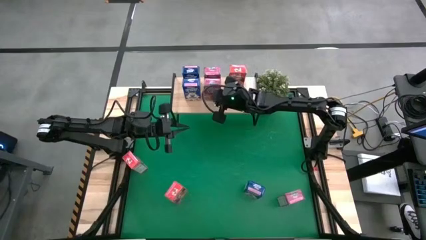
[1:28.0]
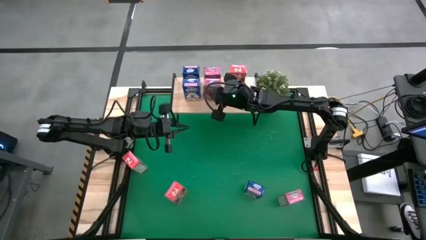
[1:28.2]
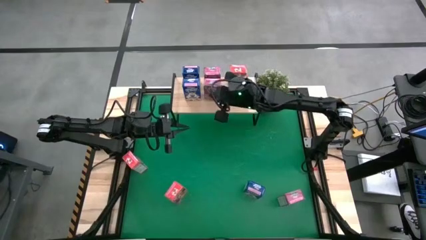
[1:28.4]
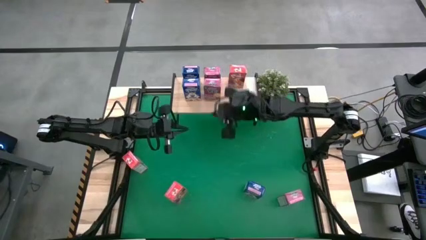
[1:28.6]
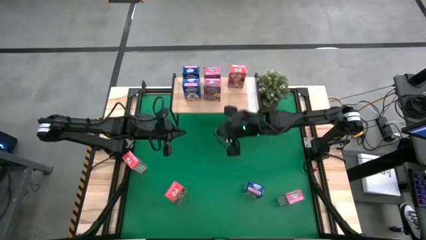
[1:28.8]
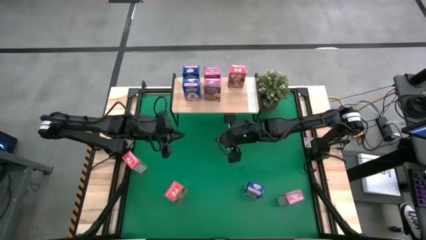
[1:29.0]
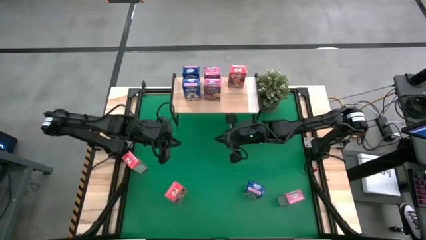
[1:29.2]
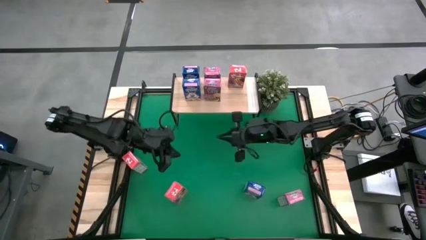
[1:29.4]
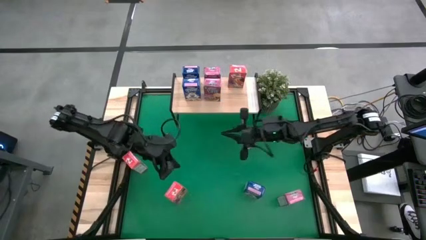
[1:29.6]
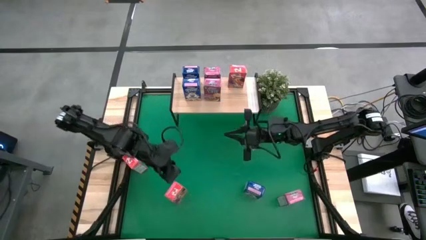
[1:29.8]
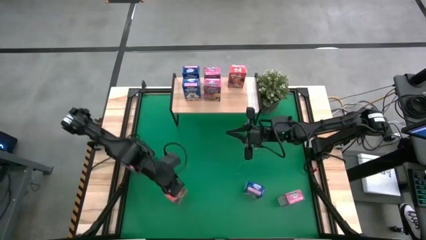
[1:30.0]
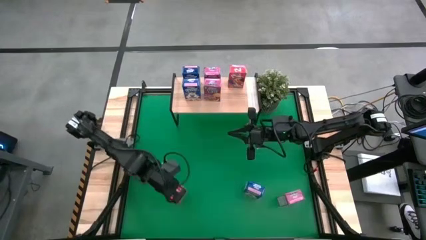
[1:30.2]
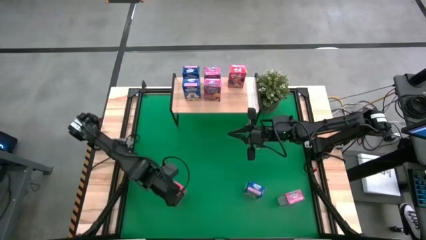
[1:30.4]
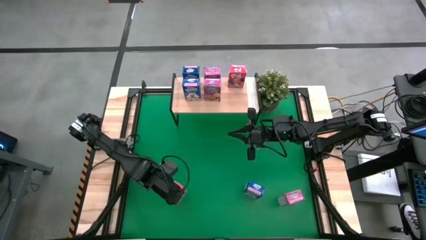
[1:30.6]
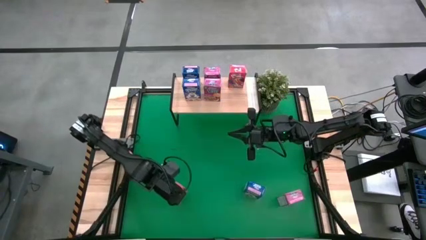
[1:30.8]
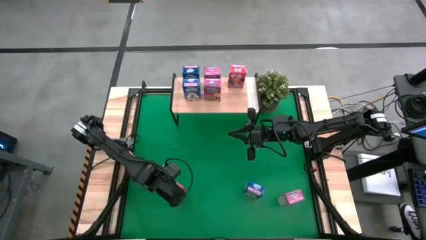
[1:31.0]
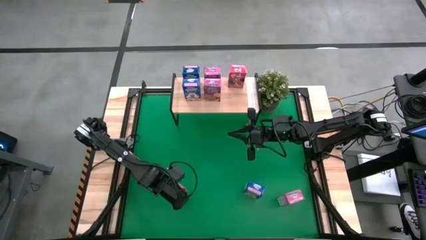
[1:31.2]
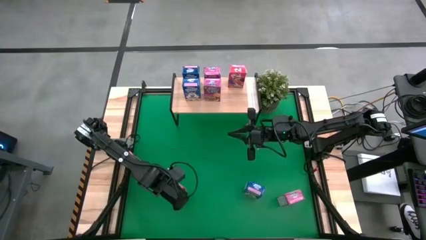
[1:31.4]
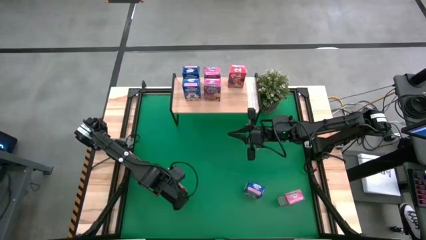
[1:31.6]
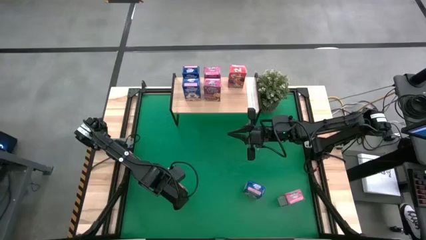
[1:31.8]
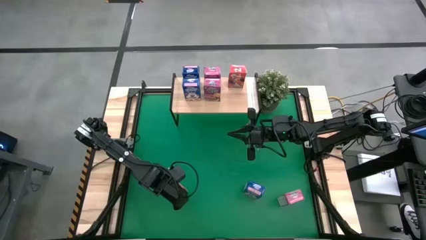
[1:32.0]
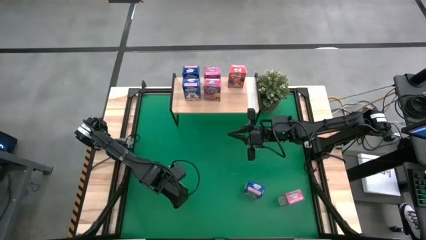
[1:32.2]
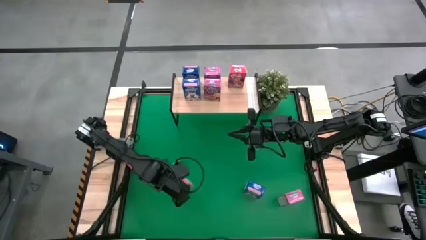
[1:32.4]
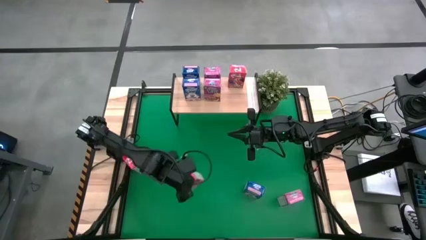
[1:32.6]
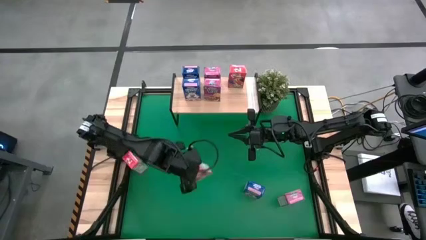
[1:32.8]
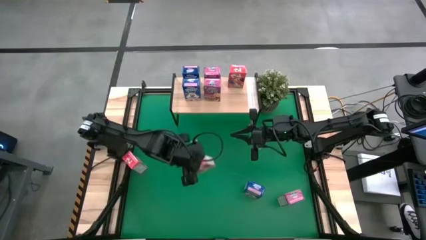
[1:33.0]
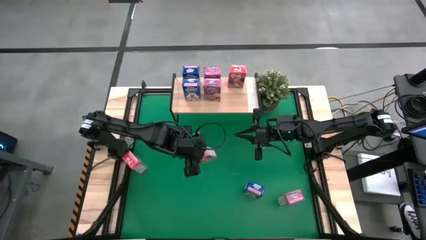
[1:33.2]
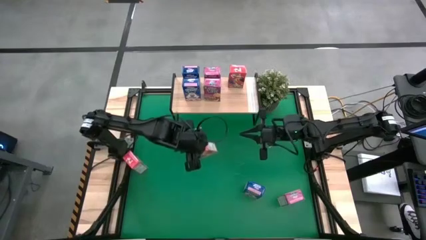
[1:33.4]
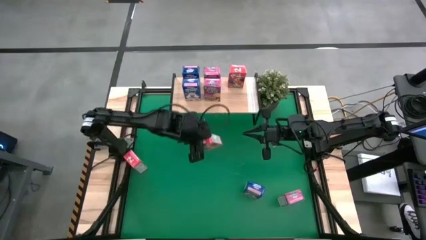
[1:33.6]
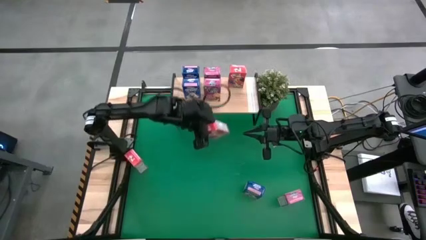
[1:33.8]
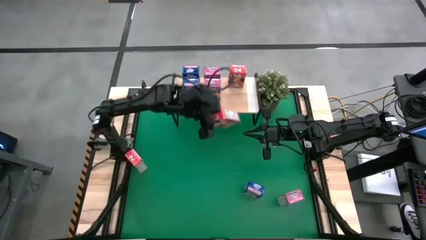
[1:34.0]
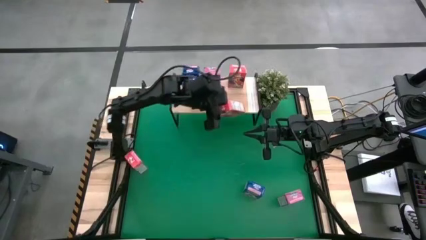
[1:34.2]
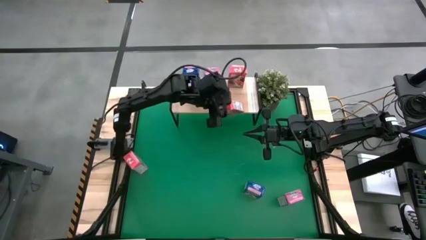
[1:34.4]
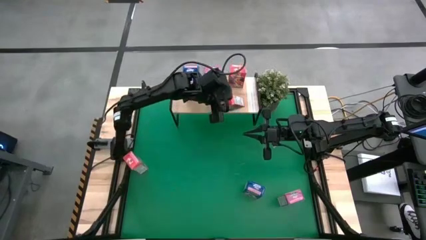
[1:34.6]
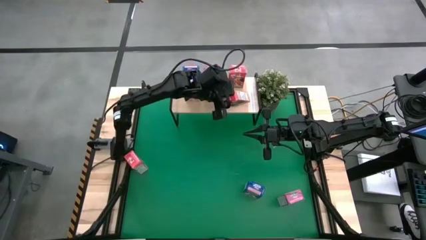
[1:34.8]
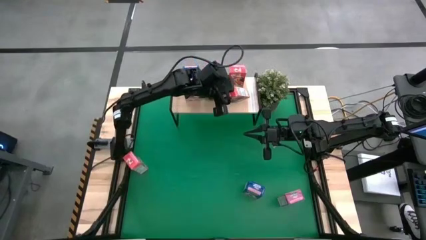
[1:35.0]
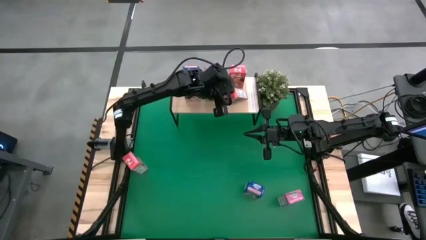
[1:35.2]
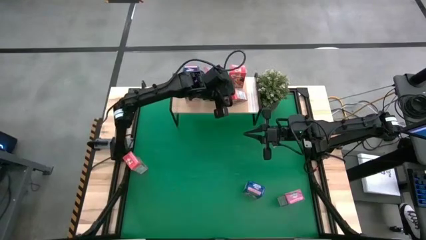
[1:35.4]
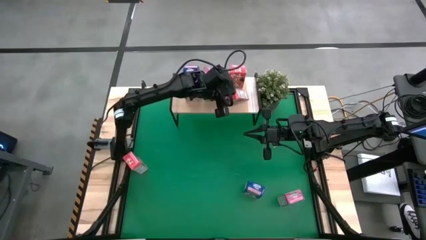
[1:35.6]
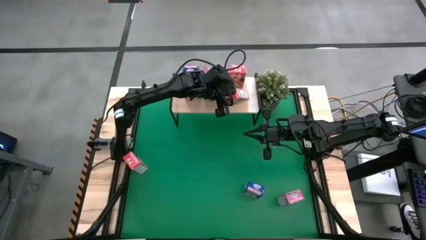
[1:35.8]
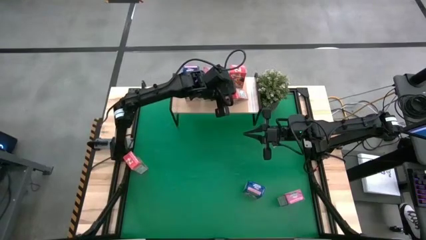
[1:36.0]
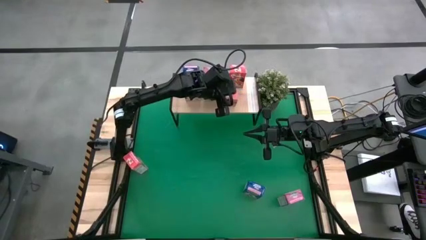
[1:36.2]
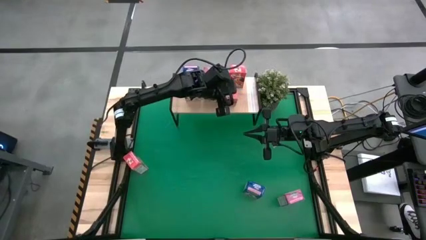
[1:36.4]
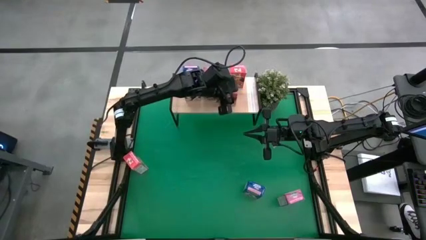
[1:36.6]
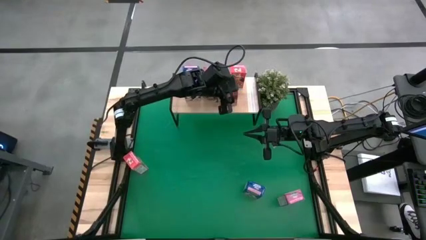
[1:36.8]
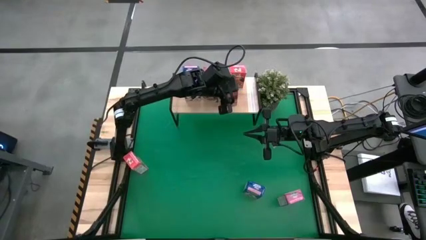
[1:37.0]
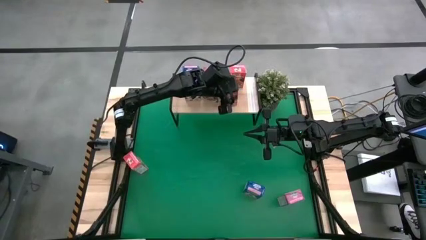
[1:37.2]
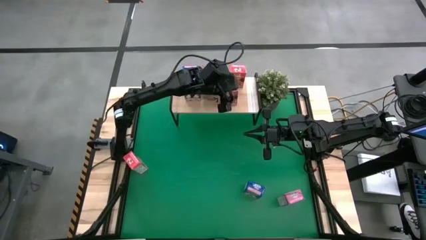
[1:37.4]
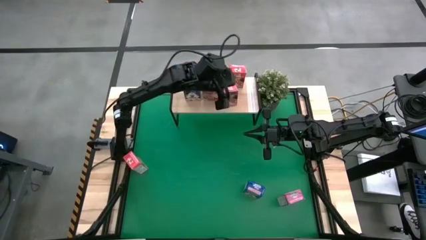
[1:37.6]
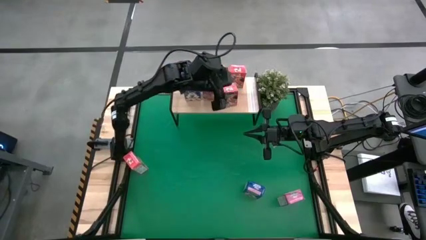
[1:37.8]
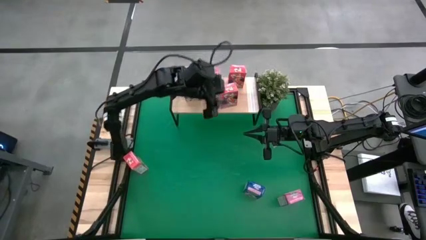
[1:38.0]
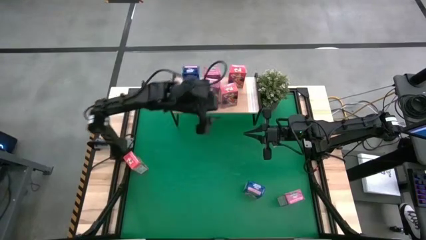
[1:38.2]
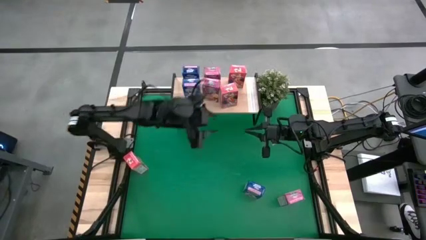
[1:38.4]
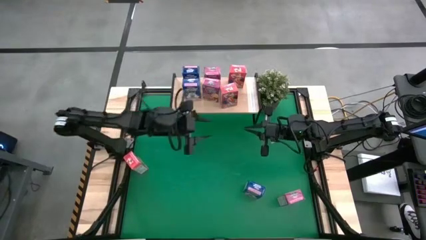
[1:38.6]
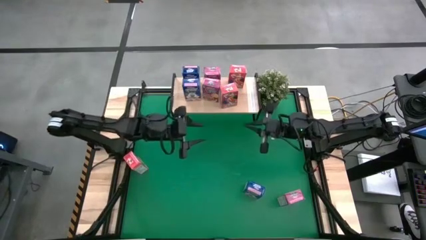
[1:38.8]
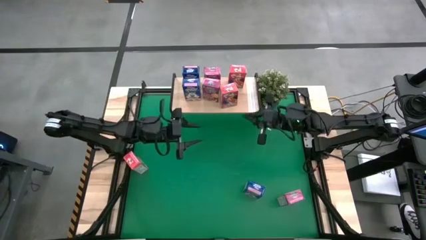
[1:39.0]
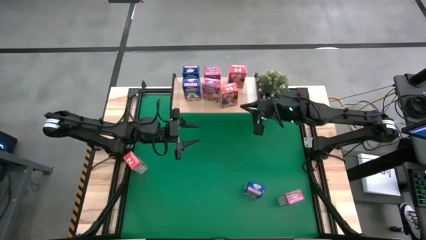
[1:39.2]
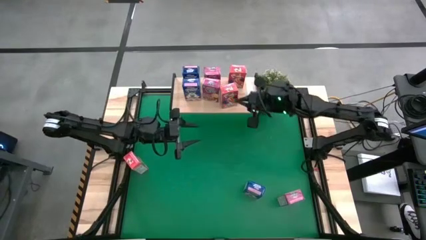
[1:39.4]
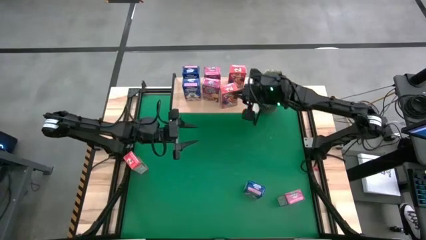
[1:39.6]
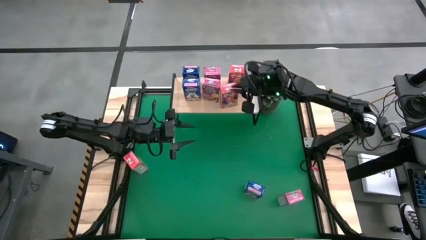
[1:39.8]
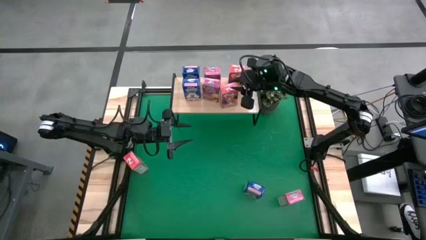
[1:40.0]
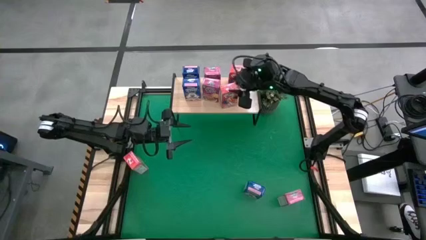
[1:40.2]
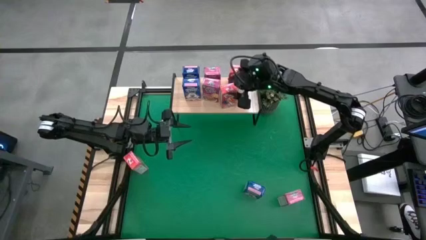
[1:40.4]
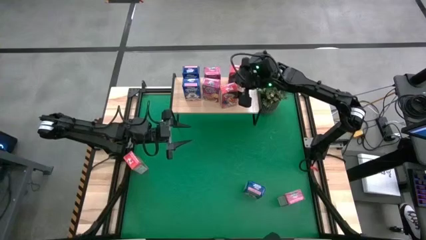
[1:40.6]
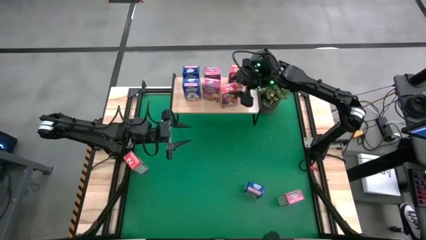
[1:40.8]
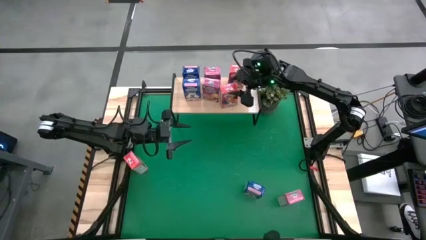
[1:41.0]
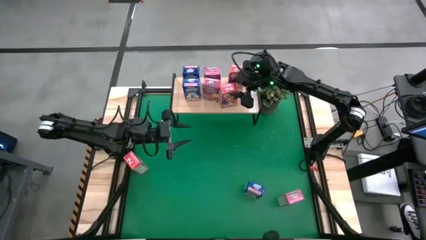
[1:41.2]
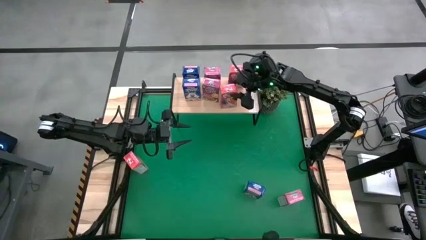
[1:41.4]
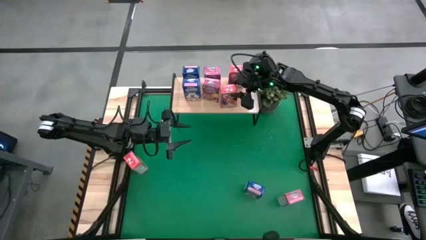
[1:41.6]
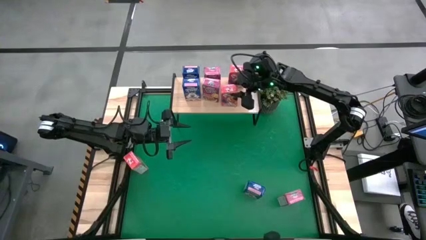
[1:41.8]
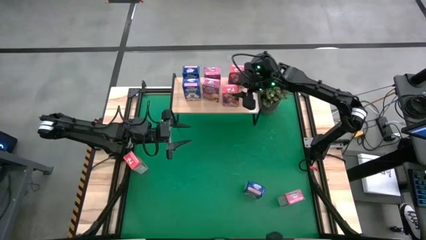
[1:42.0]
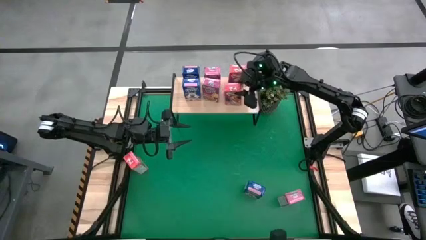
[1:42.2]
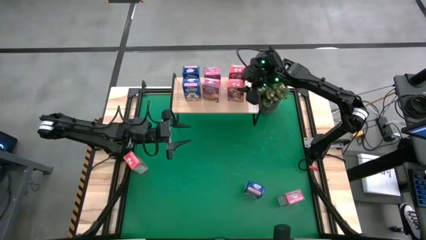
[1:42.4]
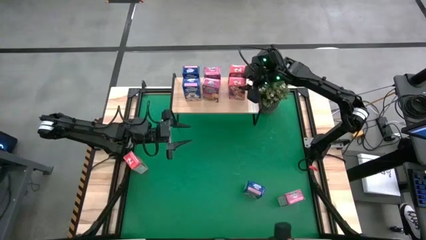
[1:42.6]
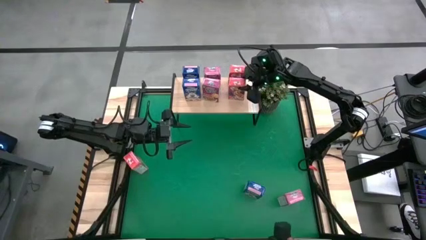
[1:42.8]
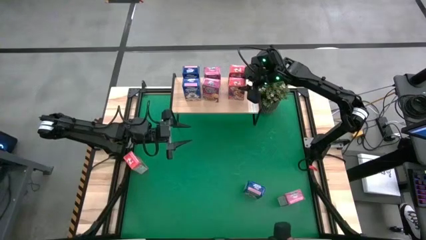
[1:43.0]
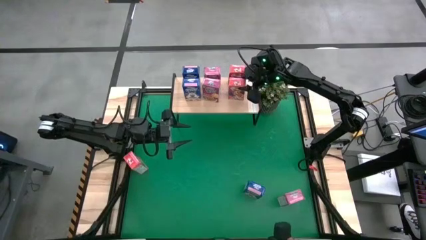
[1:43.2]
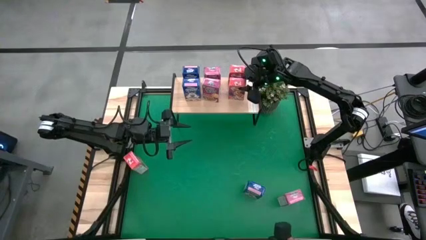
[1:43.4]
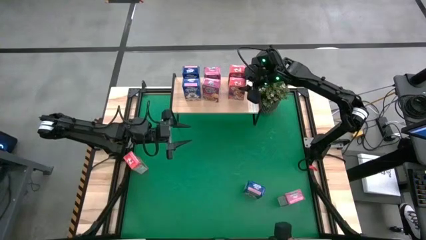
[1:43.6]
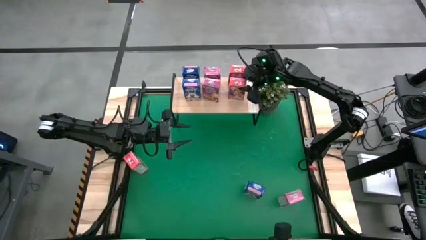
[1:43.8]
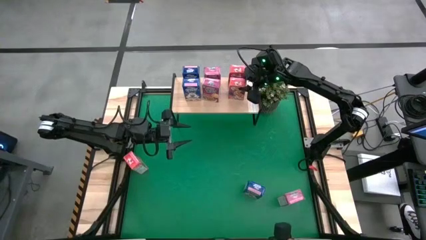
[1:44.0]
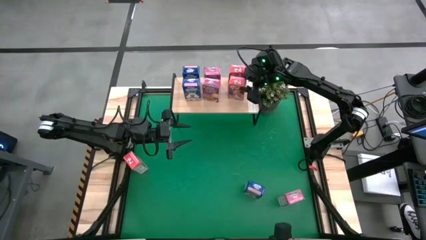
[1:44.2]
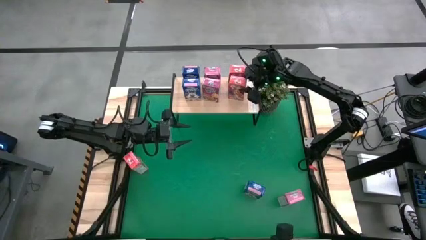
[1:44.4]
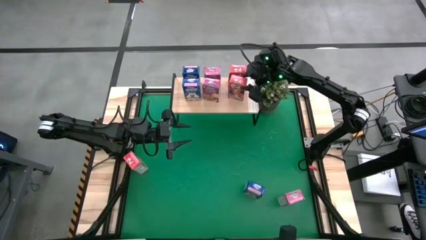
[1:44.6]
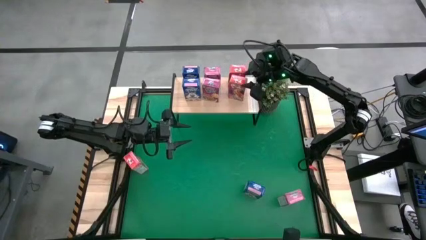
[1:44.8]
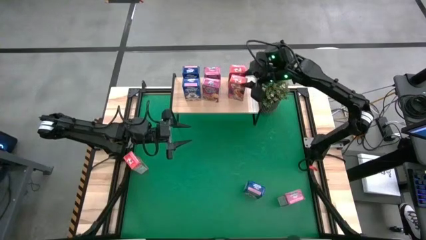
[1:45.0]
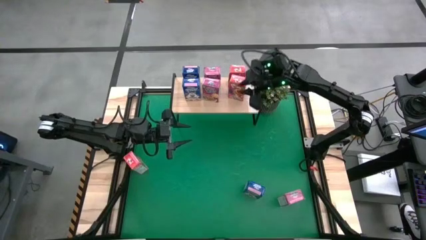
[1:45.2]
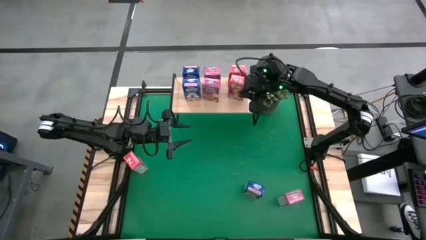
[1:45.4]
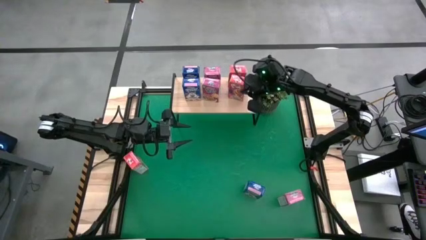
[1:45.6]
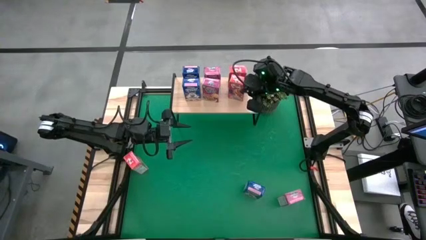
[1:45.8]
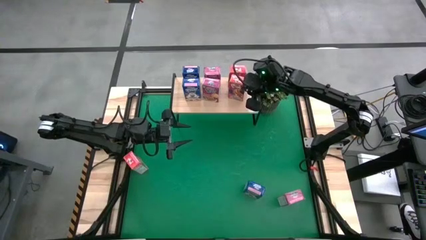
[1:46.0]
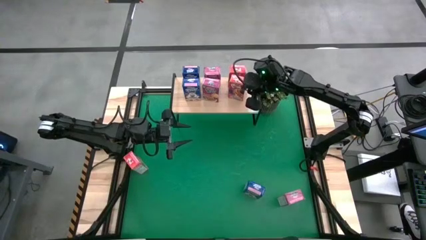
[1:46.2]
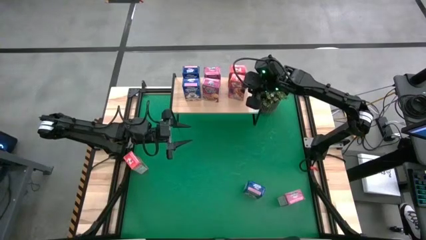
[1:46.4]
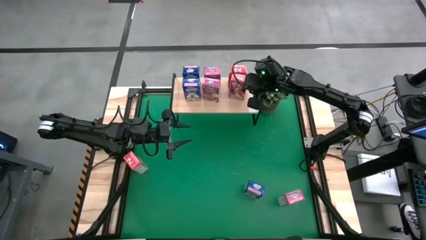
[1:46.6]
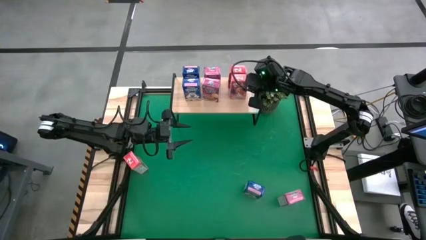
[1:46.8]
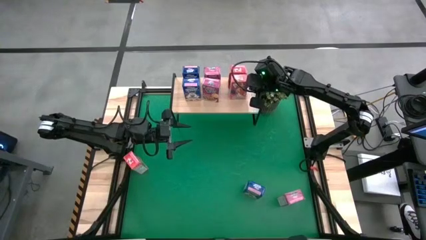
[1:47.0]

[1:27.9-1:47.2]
Task: Stack cereal on shelf
Put the bottom right red cereal box on the shelf aligned with the red cereal box
